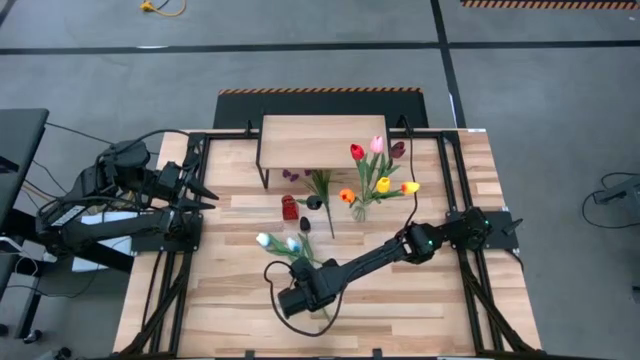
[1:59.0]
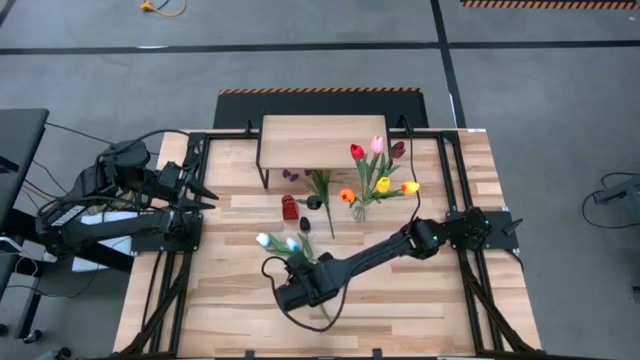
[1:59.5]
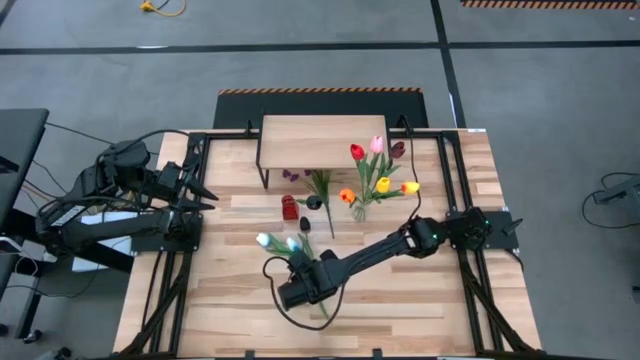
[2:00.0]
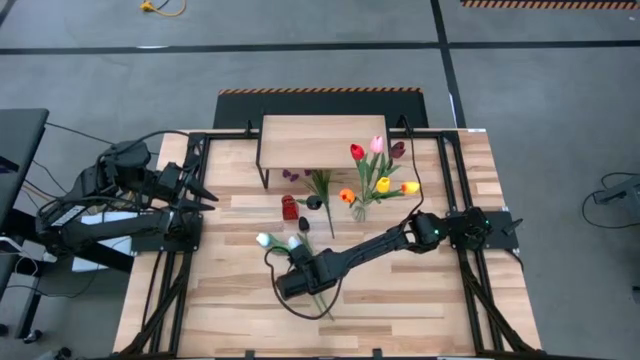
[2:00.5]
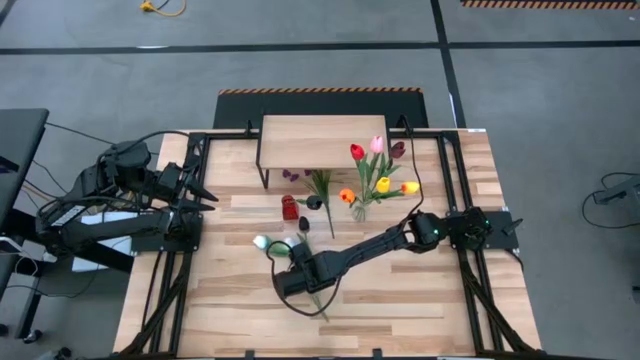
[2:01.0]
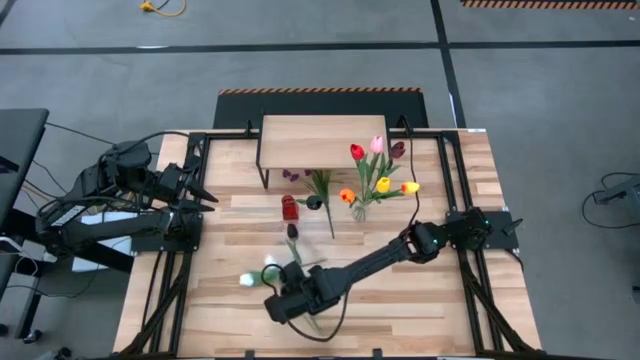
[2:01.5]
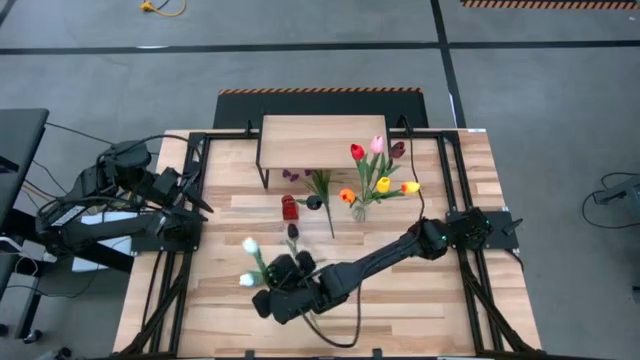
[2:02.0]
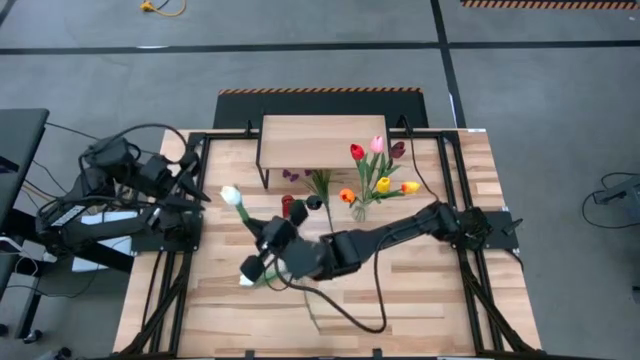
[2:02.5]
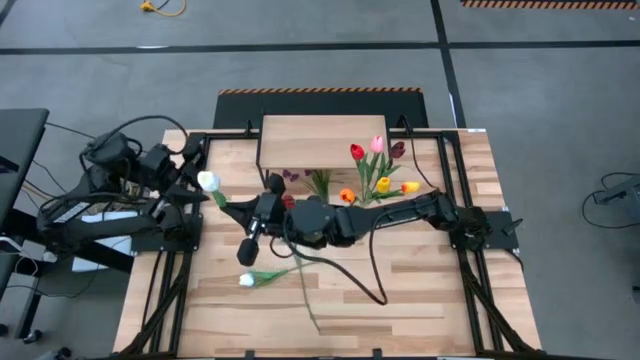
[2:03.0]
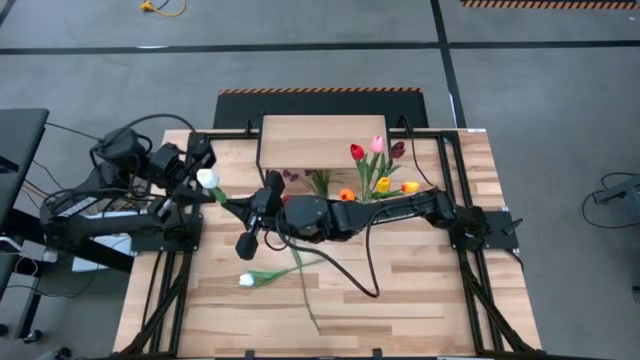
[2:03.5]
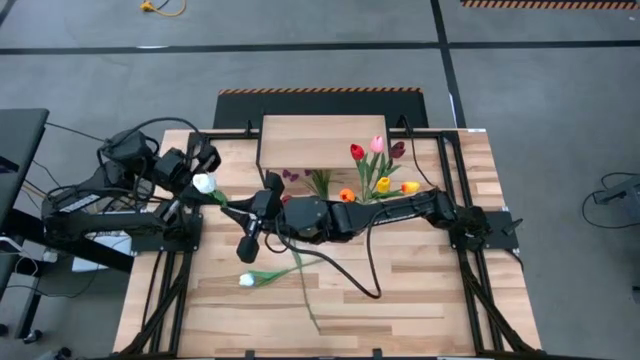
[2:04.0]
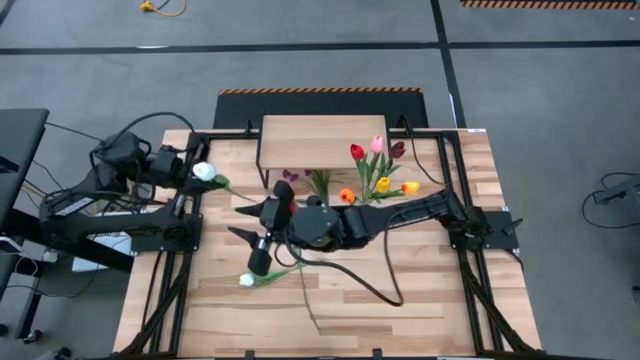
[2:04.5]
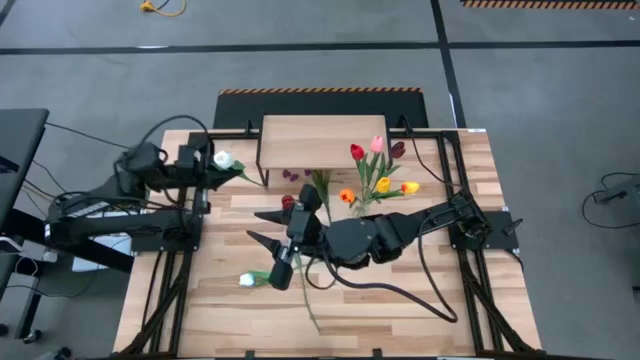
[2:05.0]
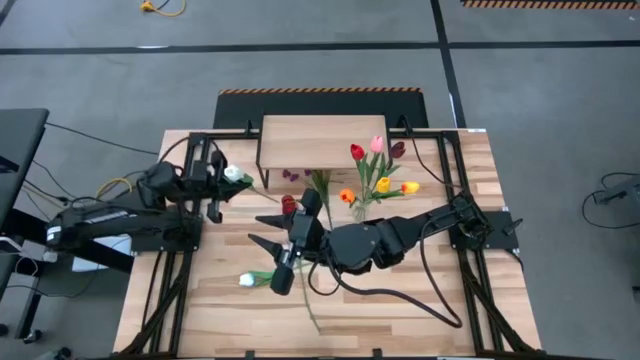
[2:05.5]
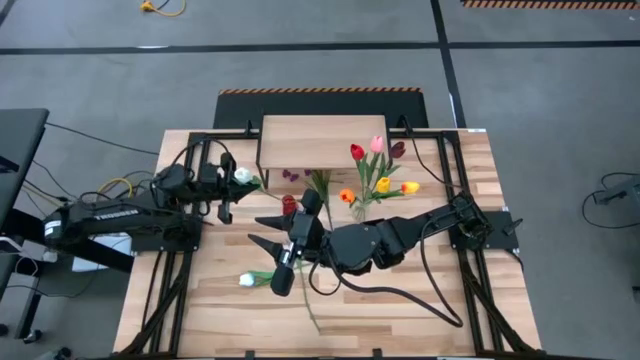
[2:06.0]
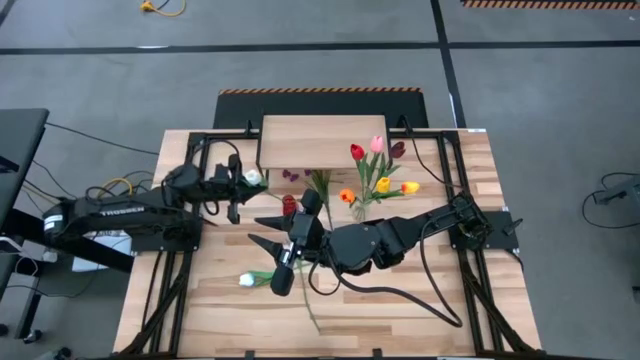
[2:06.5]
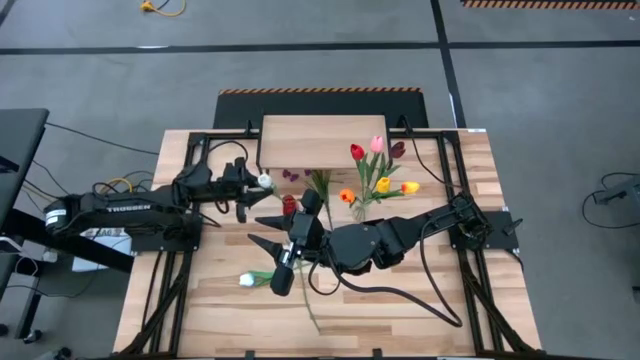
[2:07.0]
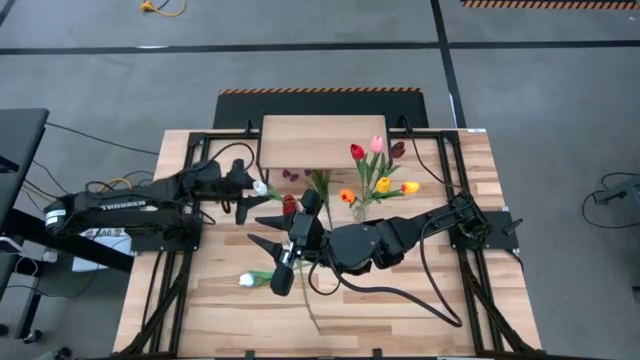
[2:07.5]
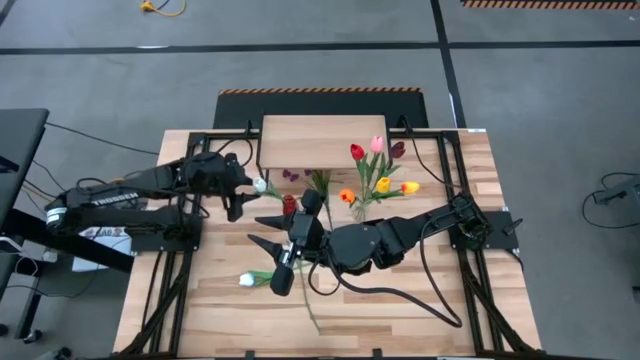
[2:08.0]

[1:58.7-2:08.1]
Task: Pick and place flowers into a vace then onto a shelf
Put the right white tulip into the red vase

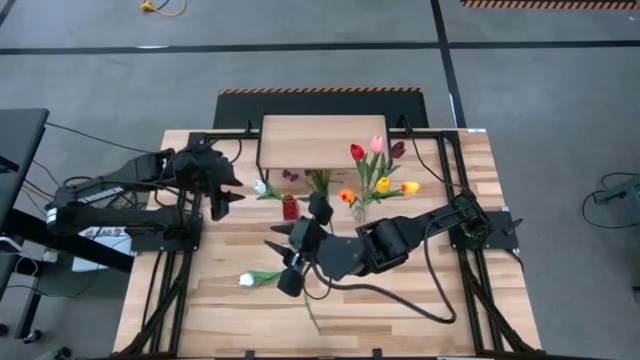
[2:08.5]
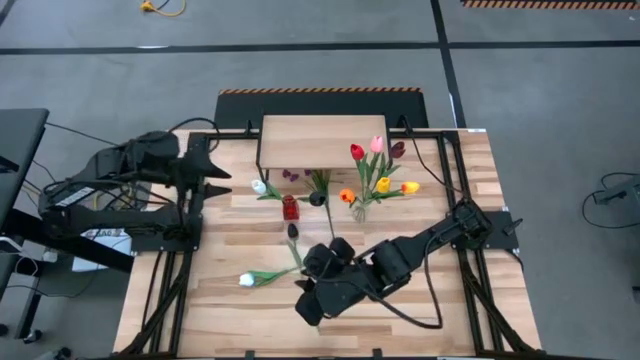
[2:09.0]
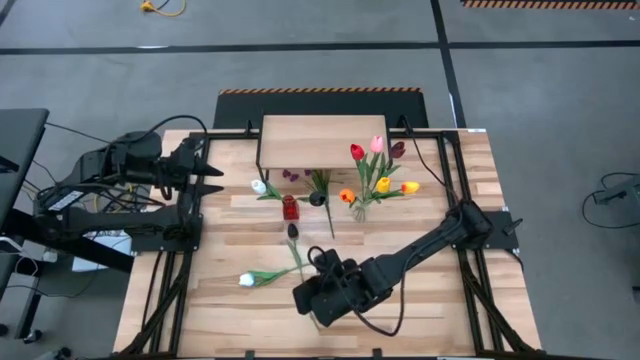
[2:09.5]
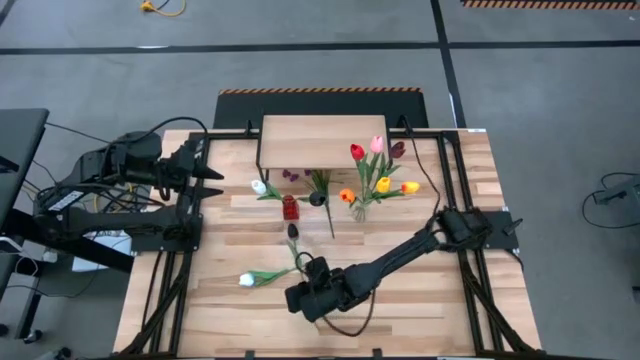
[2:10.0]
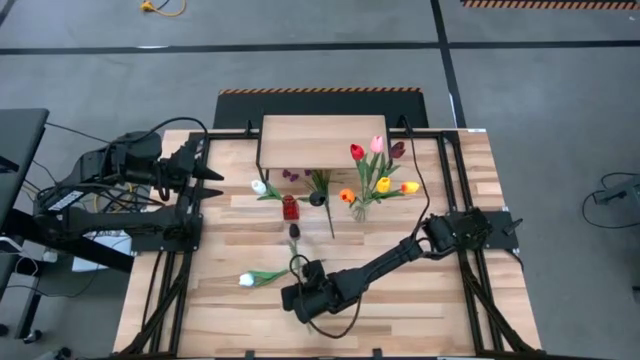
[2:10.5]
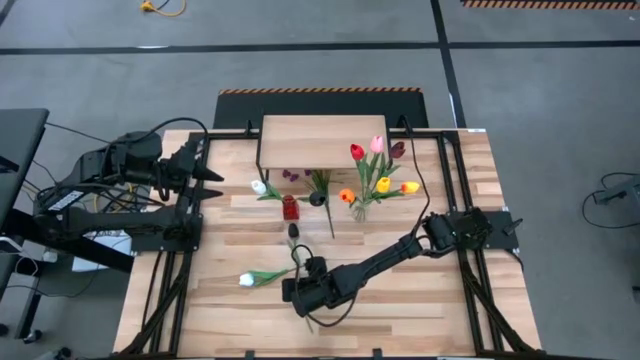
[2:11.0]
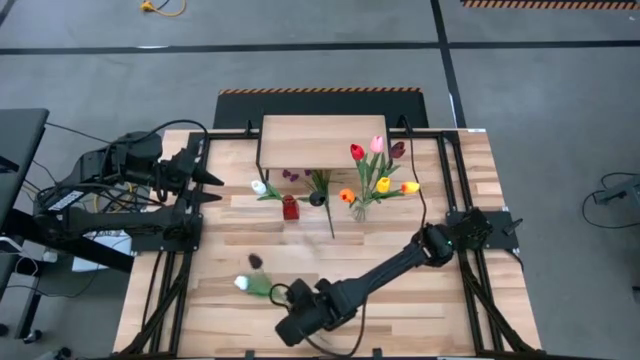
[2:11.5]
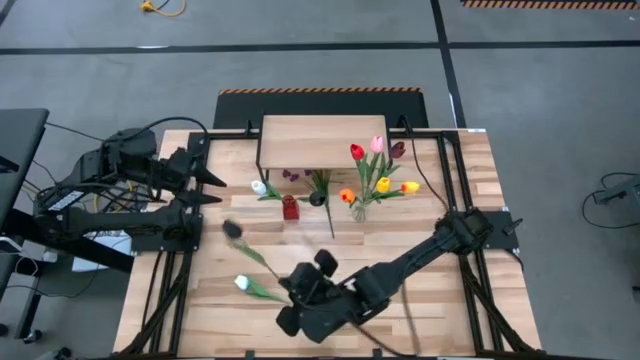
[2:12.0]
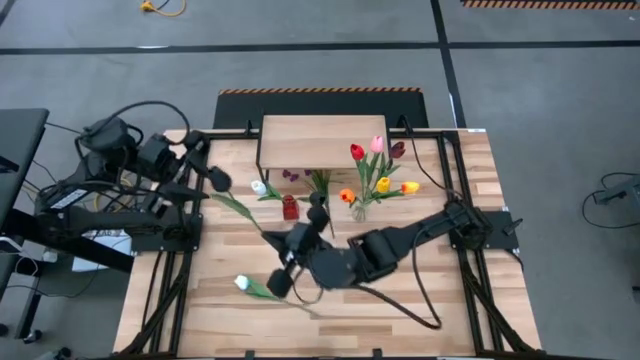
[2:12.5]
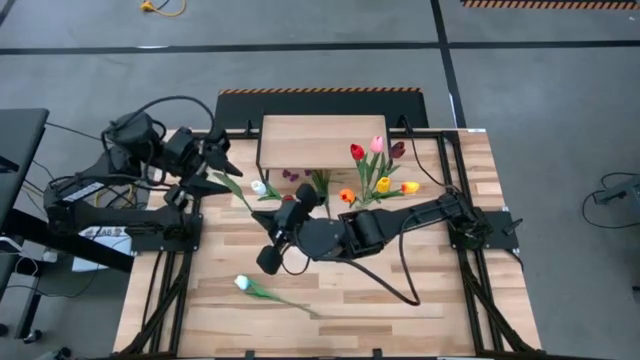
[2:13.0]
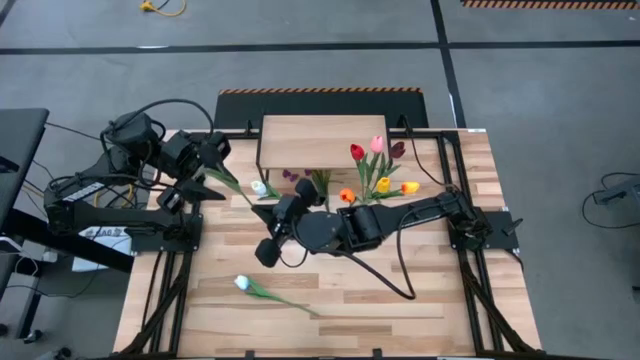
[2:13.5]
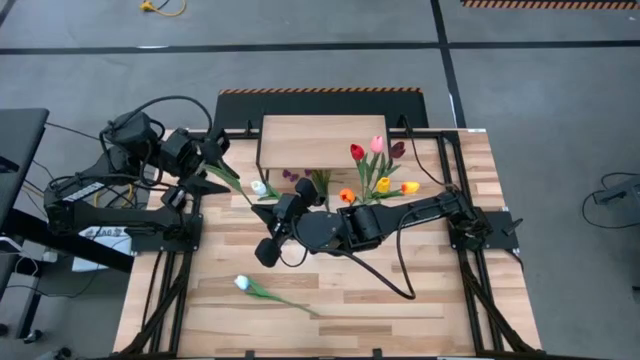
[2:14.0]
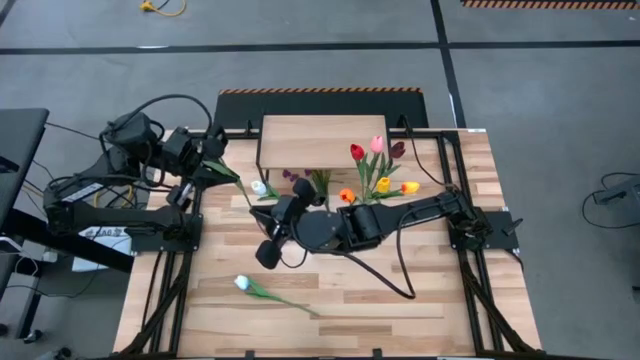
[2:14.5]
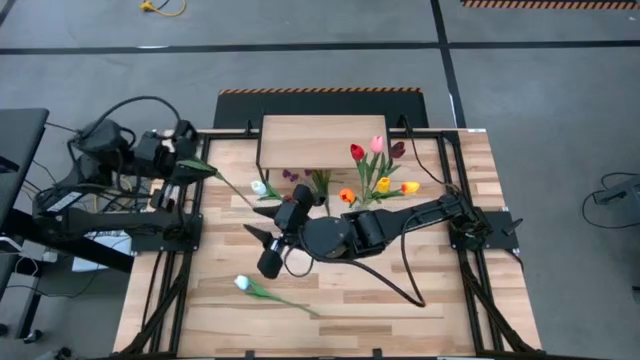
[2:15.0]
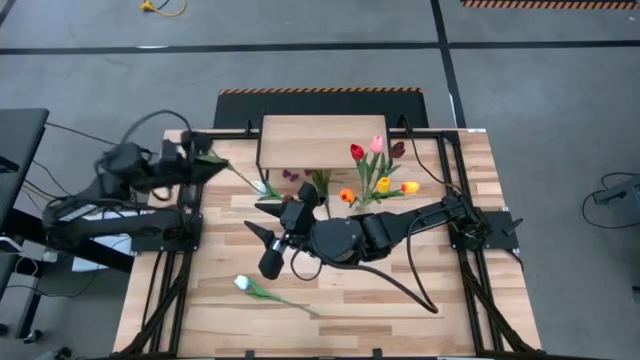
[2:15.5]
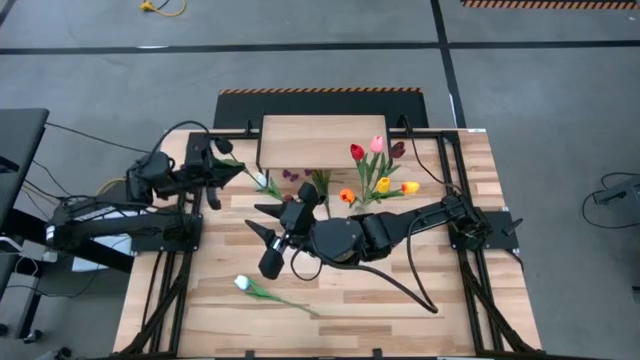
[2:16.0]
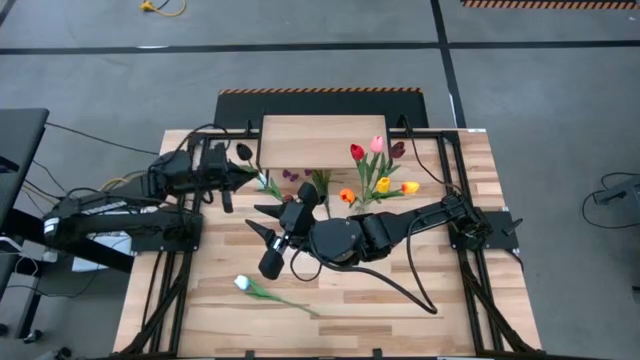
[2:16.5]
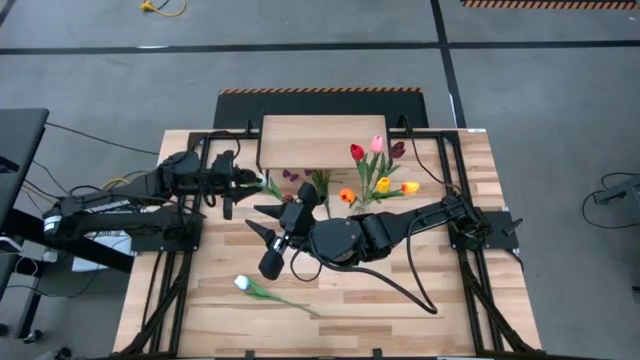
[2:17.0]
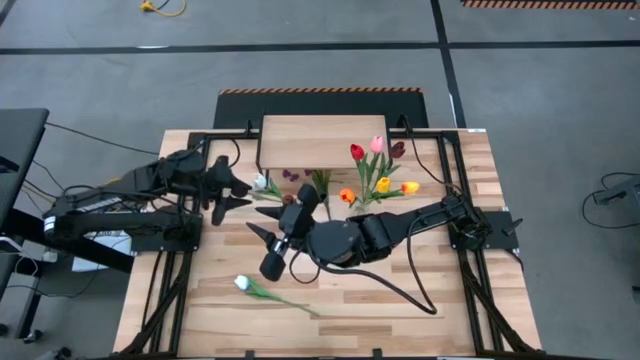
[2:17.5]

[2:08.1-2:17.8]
Put the black tulip into the red vase

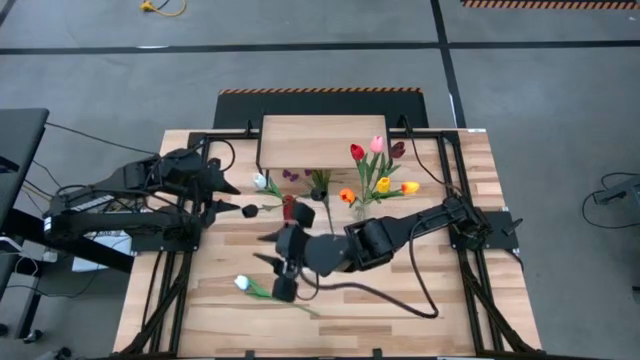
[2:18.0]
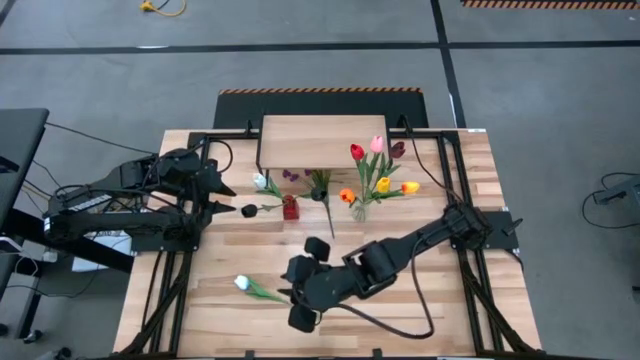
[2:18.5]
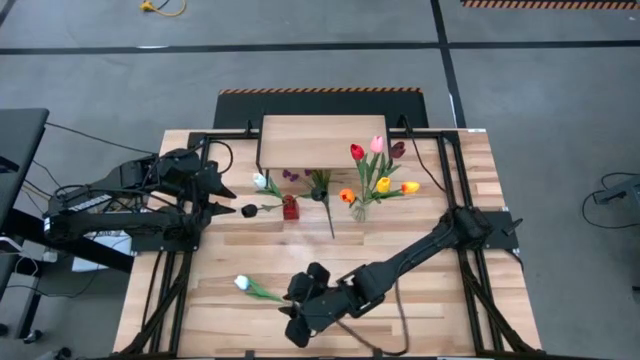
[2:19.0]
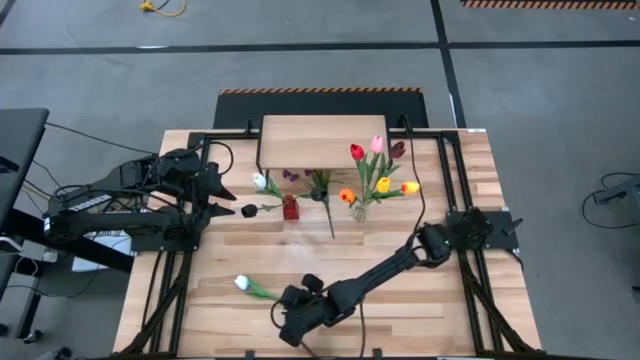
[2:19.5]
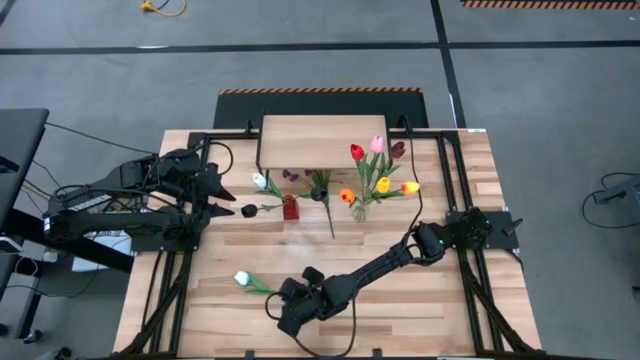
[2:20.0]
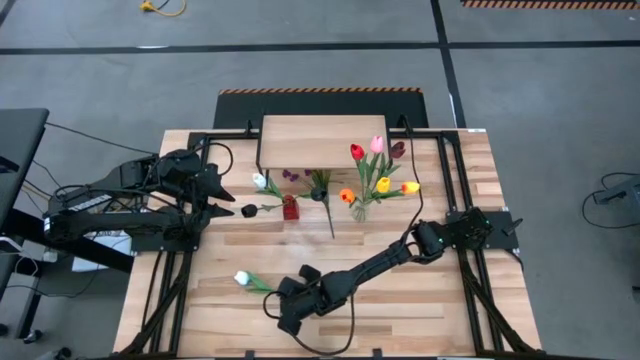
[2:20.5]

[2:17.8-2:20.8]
Put the white tulip into the red vase
